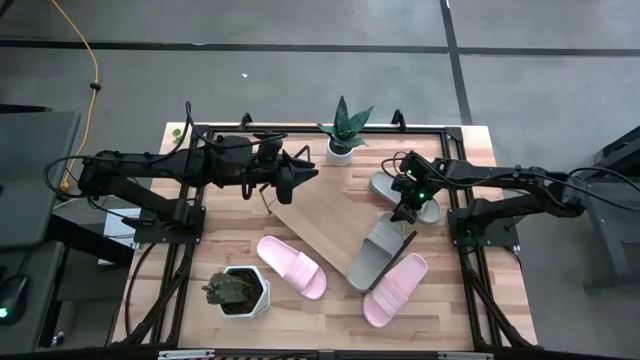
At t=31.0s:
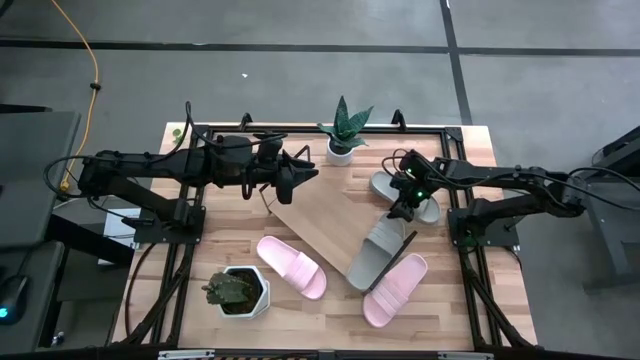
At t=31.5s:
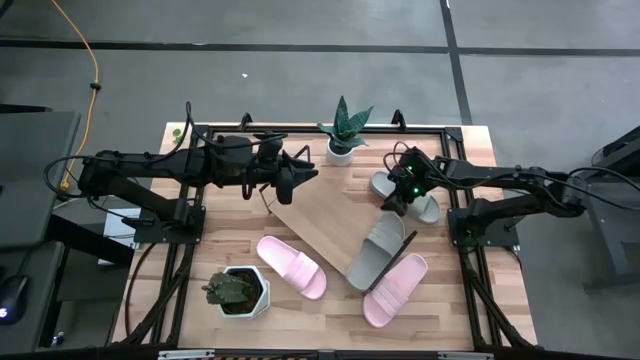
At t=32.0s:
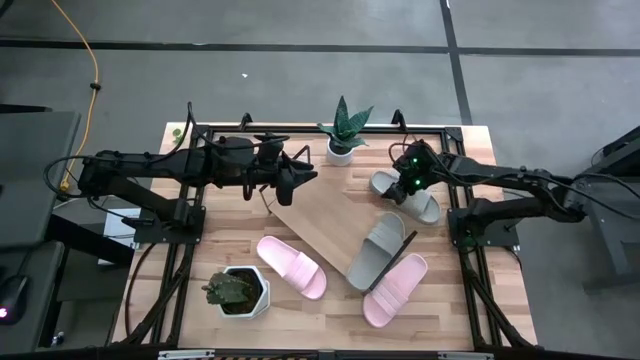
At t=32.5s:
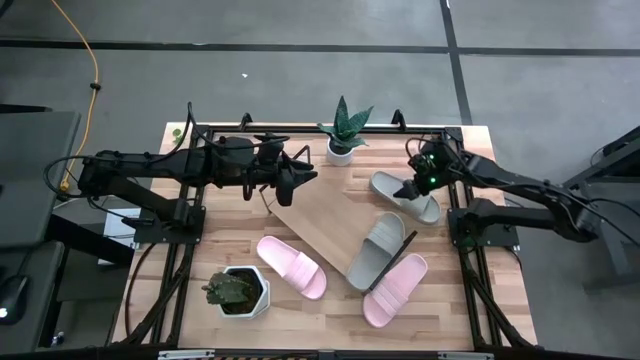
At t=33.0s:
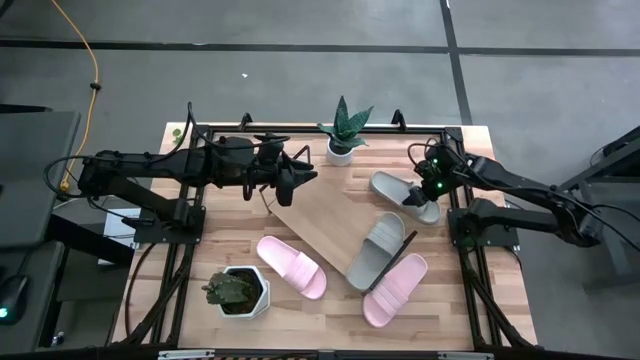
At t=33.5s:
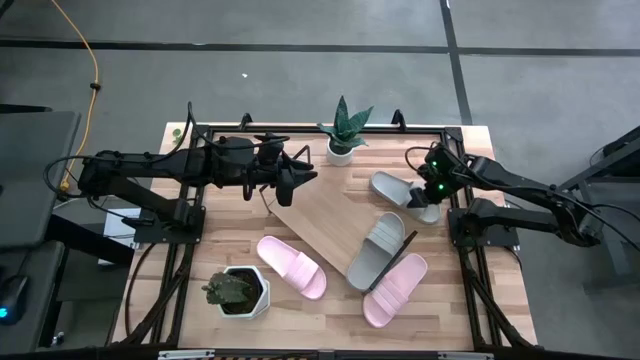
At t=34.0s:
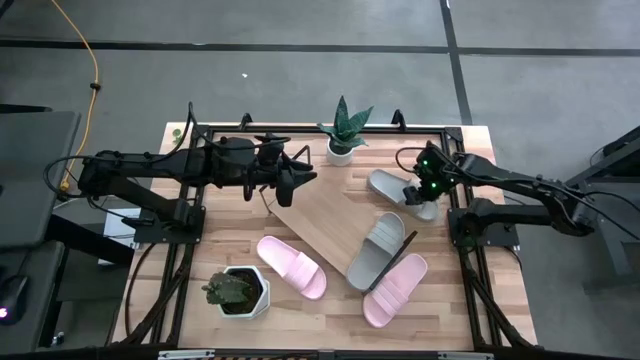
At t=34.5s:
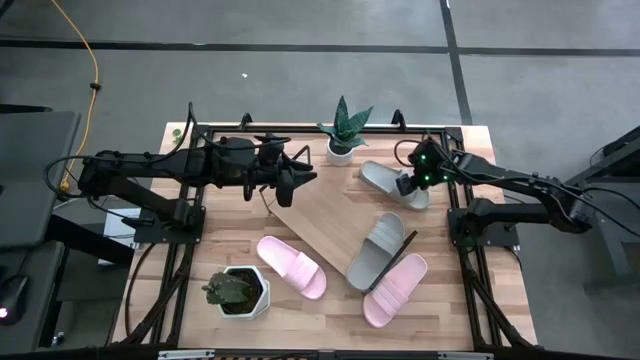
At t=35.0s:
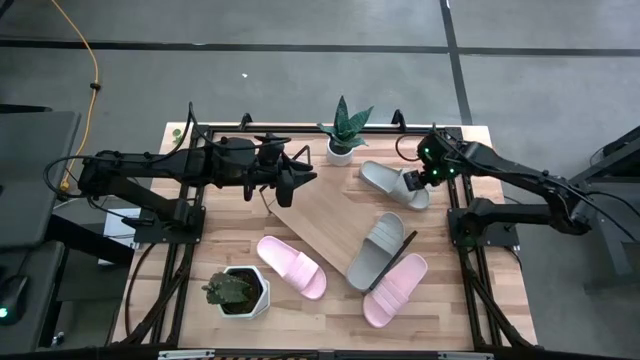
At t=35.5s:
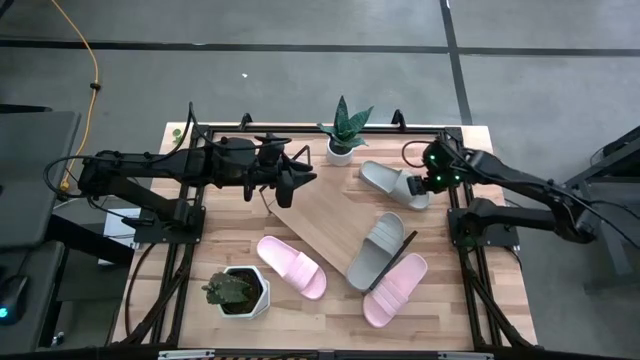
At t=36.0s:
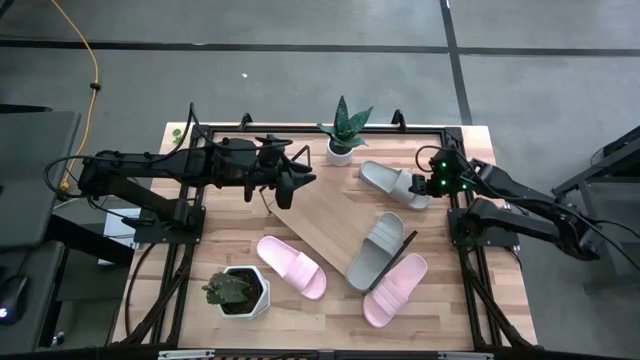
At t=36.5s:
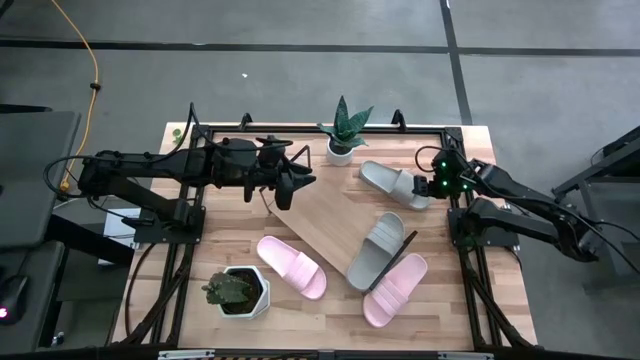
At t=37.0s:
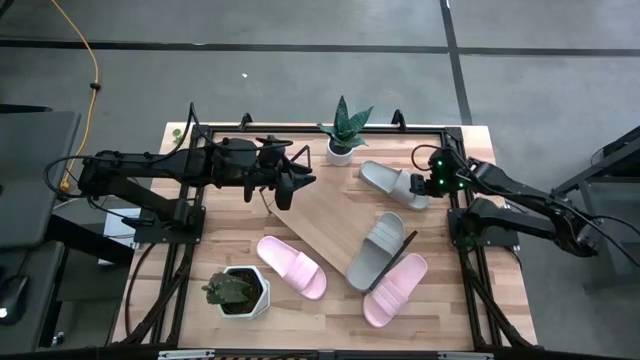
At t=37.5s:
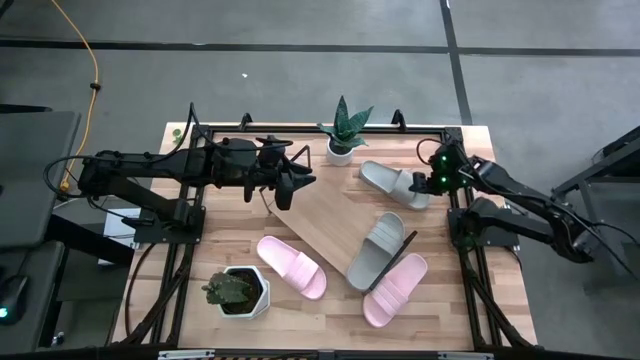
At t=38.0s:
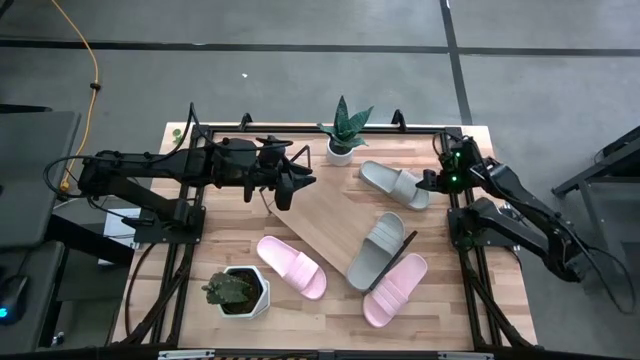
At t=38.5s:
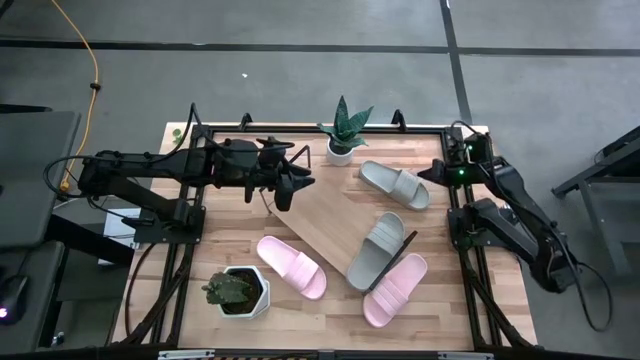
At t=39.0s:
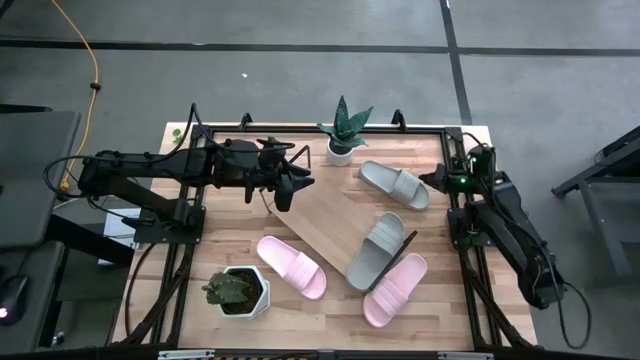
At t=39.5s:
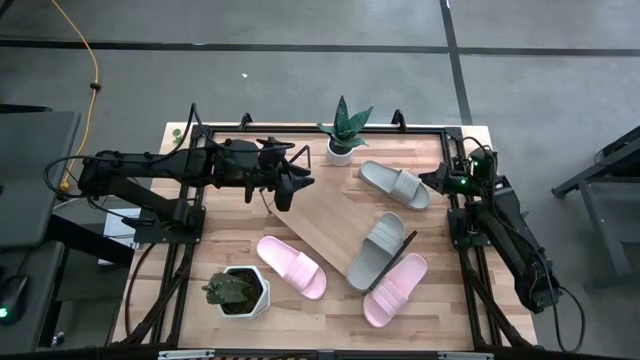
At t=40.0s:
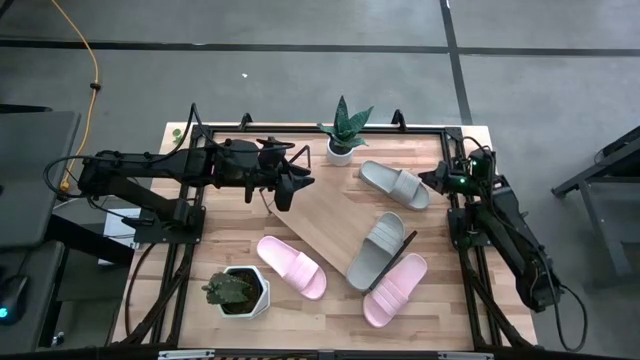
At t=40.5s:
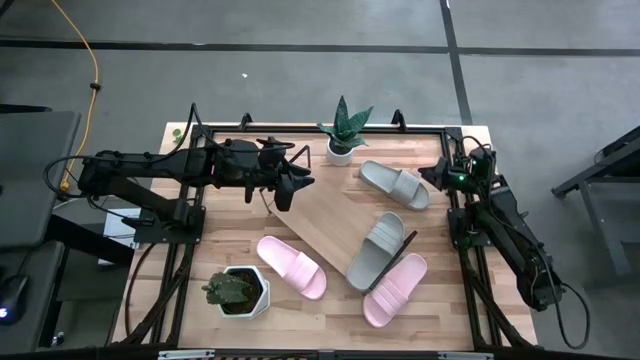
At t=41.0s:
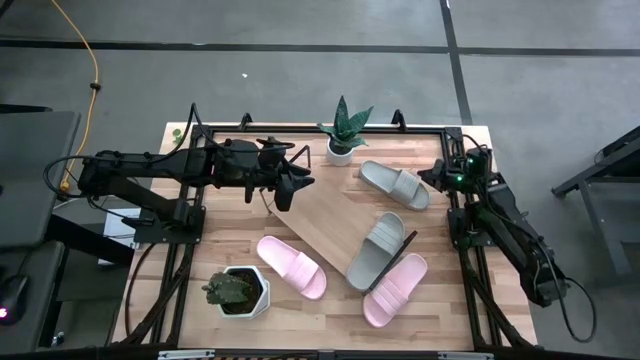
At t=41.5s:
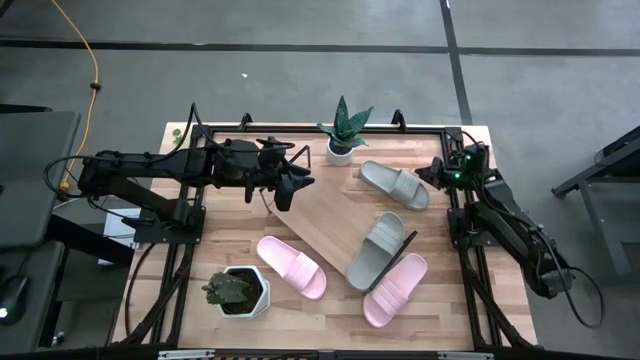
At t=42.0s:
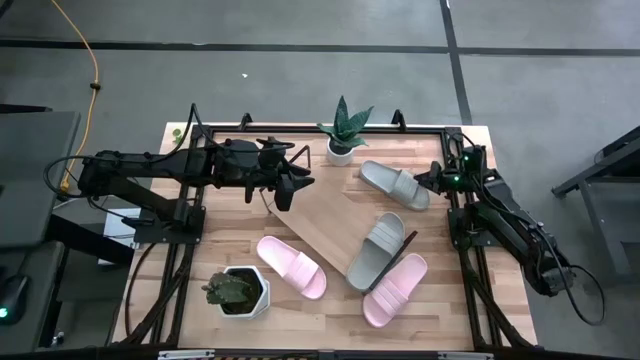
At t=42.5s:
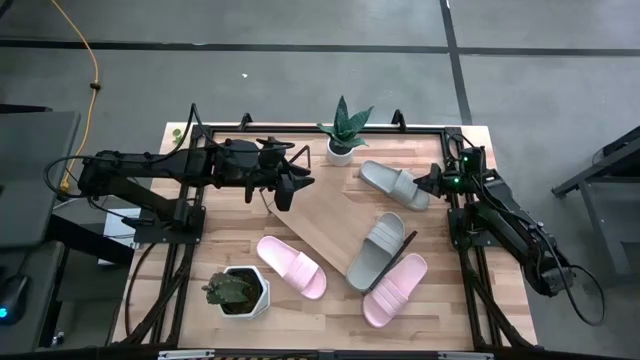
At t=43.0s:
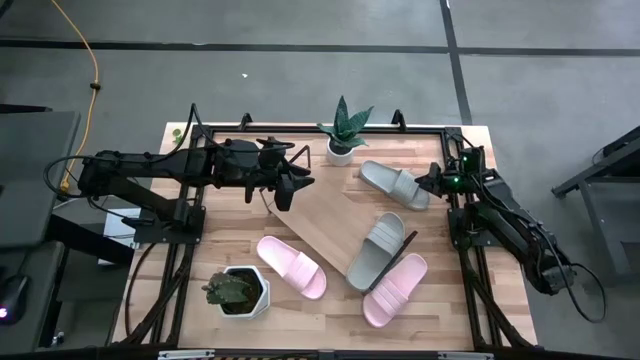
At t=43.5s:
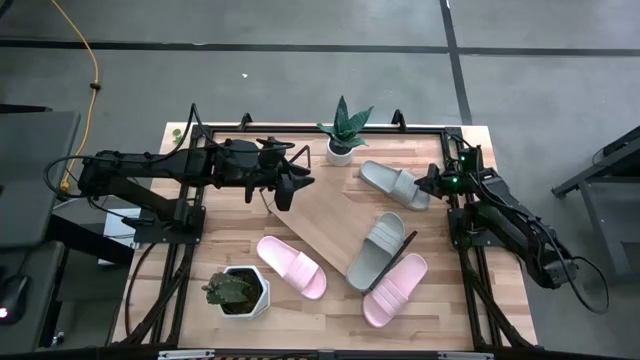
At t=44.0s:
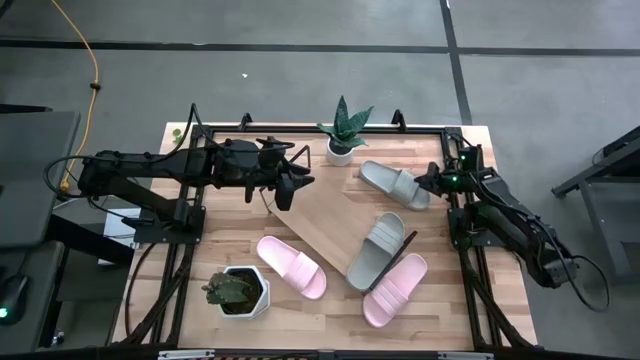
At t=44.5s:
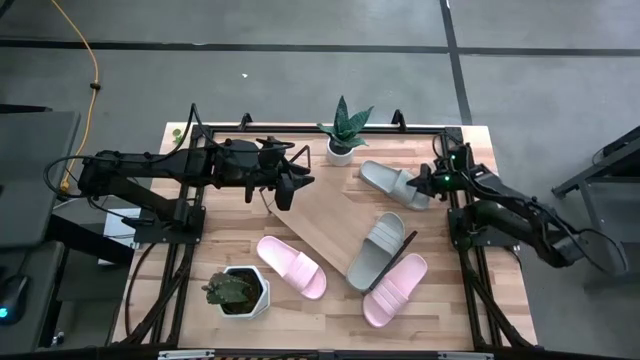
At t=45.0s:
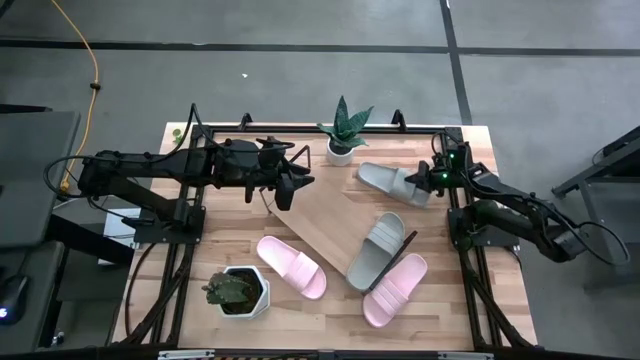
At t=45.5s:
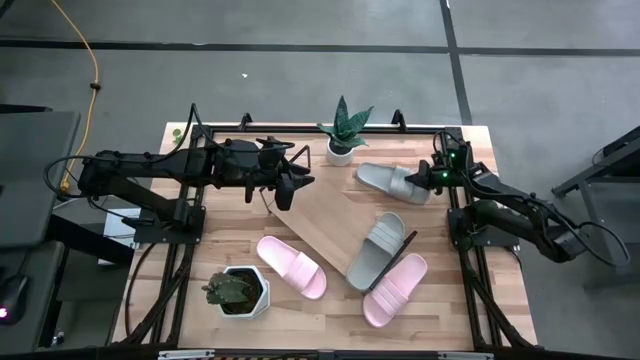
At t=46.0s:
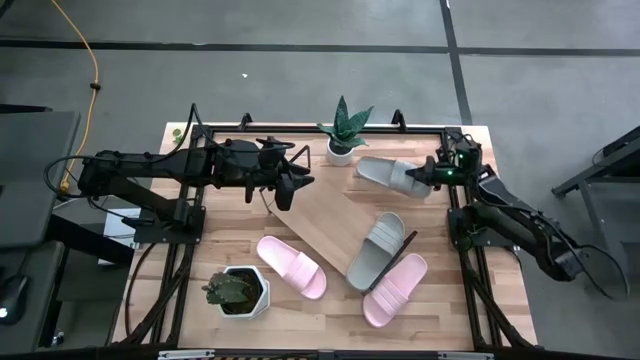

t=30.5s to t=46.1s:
Task: Pick and place slides into the shelf
Put the gray slide on the shelf

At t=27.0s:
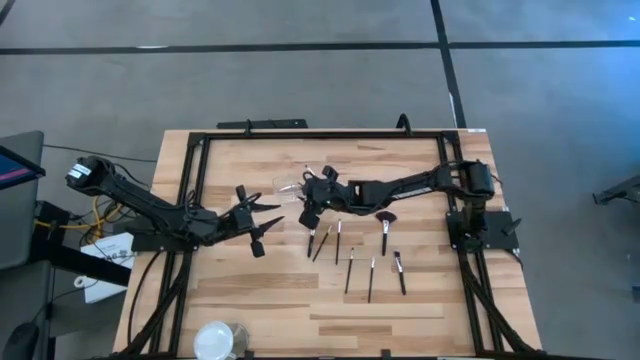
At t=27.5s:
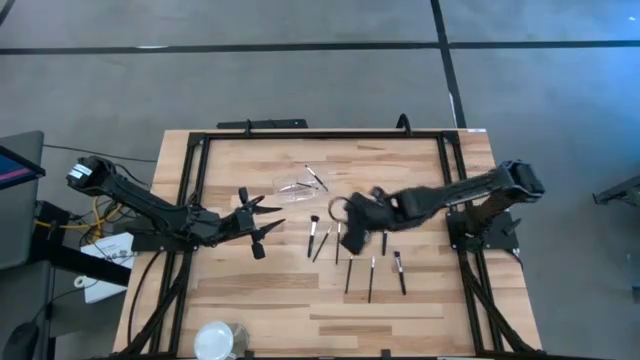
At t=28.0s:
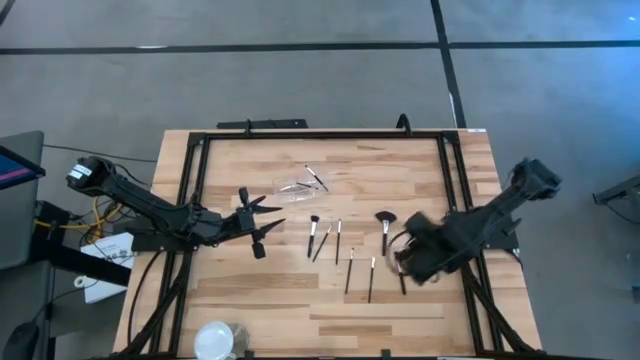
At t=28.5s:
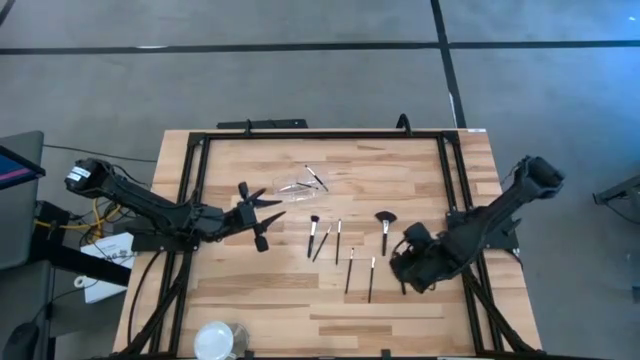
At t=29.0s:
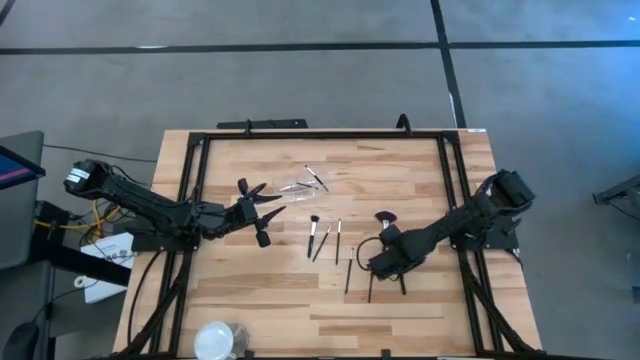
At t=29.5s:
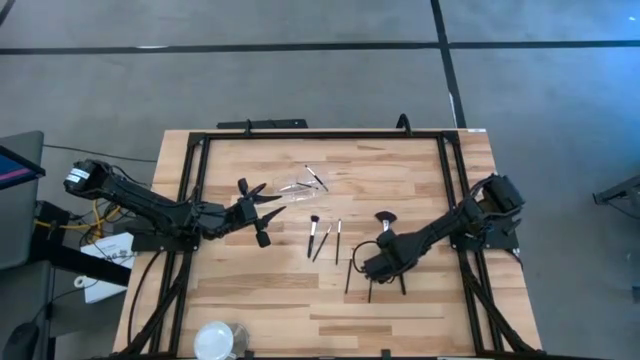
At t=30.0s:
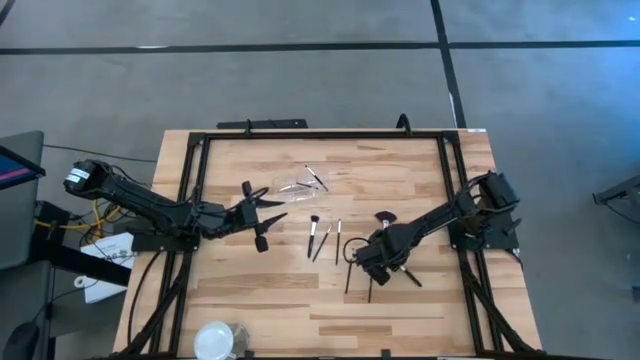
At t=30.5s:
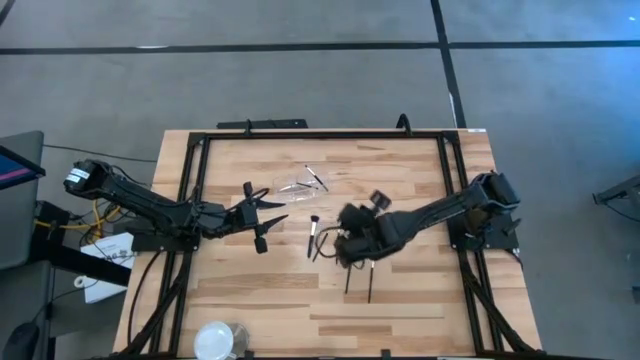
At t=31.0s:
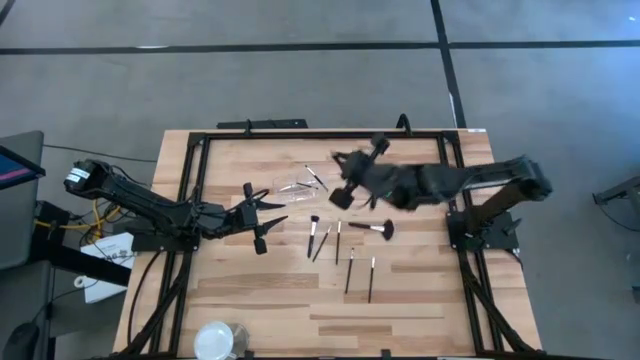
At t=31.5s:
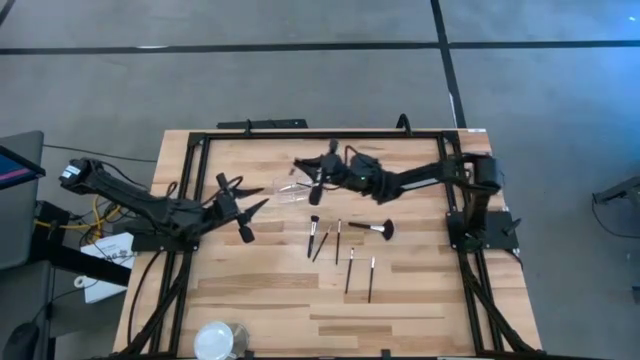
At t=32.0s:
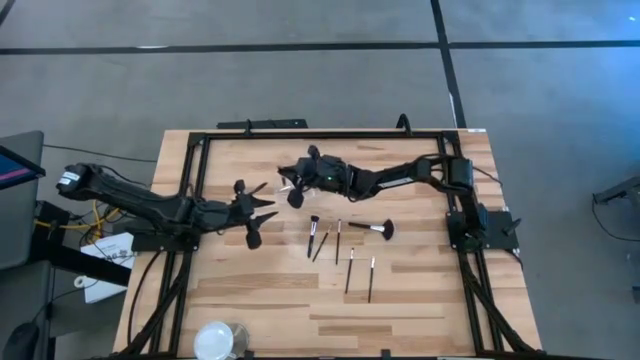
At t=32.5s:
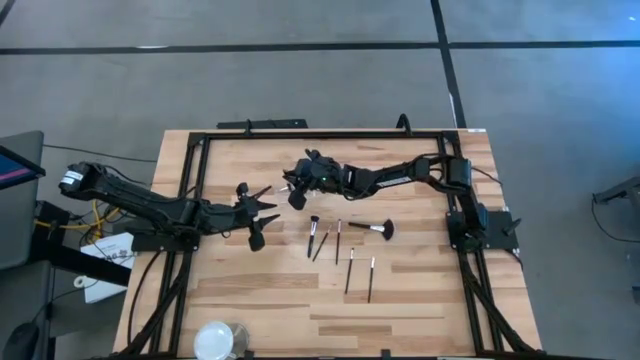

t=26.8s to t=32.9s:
Task: Put items in baskets/containers
Put the black blush brush into the transparent organizer

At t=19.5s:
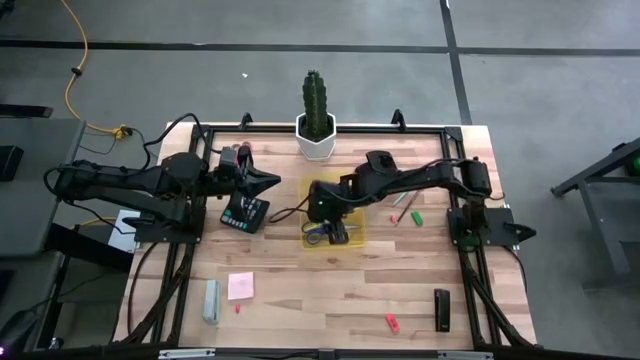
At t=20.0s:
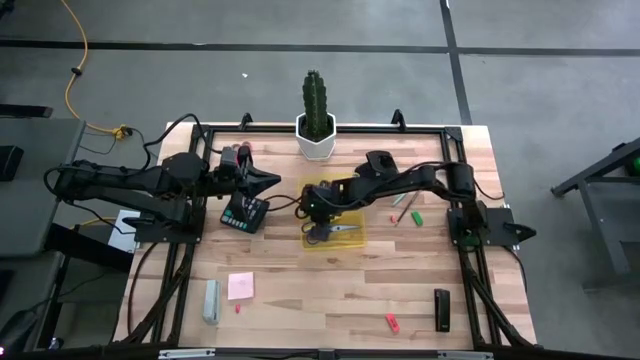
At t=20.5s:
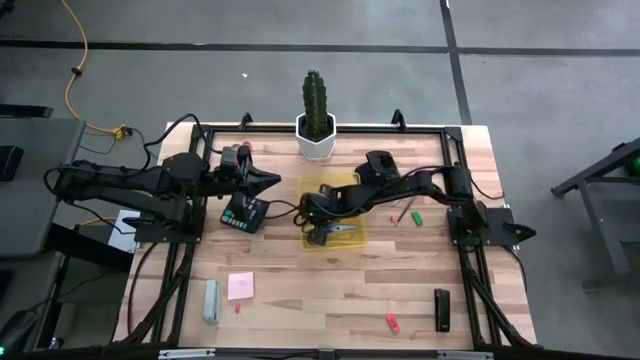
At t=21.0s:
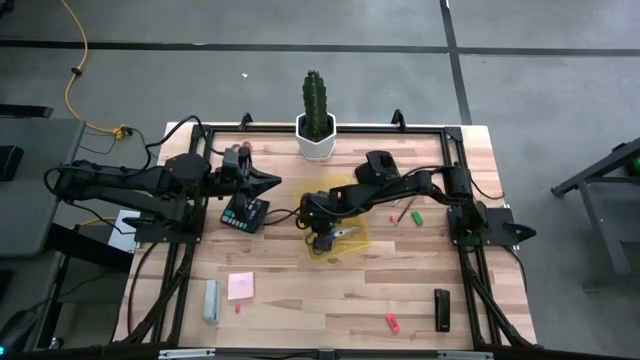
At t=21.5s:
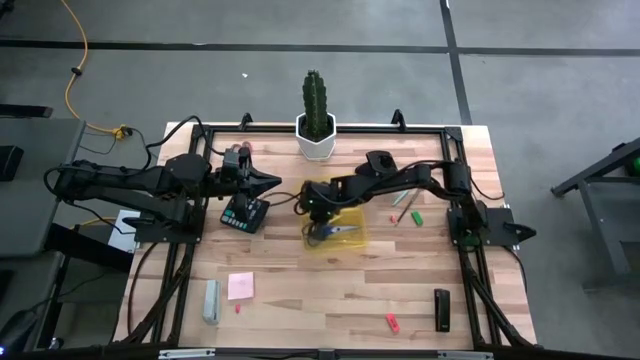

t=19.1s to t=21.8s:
Task: Pack school essentials
Adjust the supply box on the table
